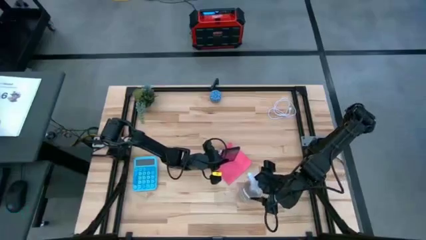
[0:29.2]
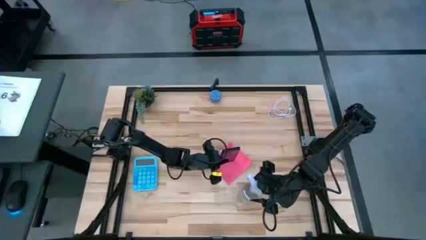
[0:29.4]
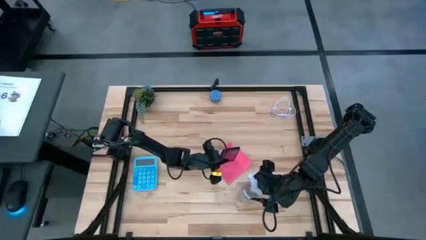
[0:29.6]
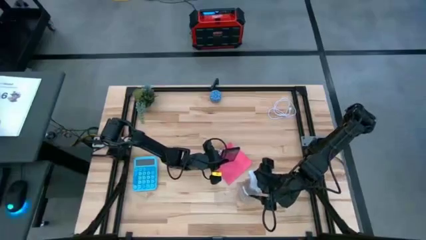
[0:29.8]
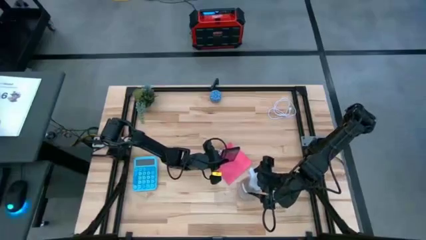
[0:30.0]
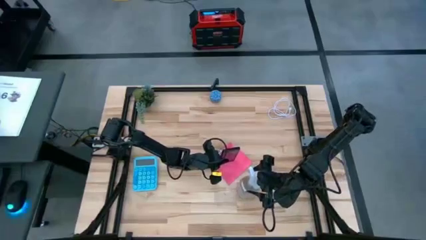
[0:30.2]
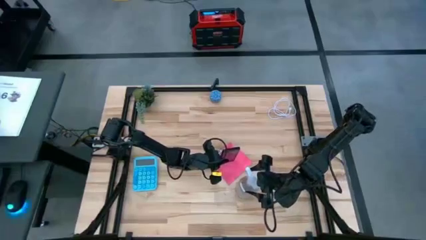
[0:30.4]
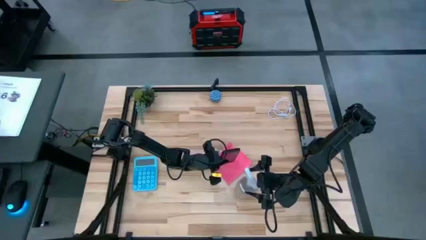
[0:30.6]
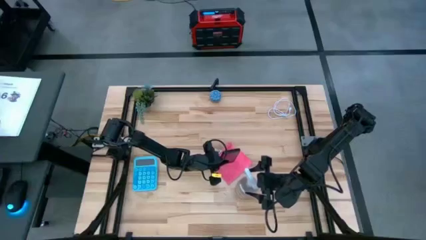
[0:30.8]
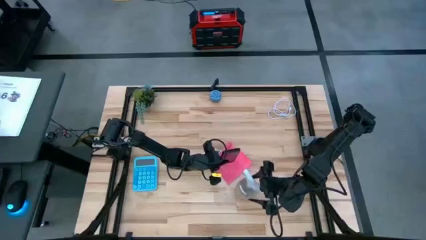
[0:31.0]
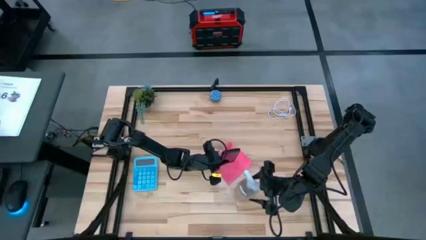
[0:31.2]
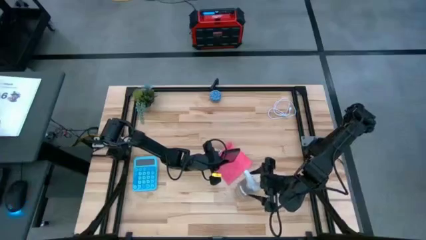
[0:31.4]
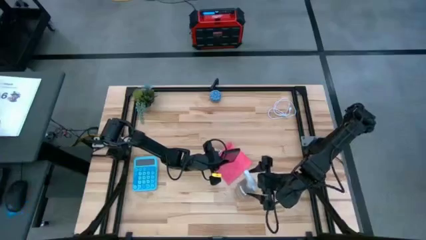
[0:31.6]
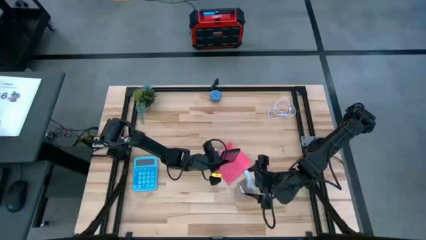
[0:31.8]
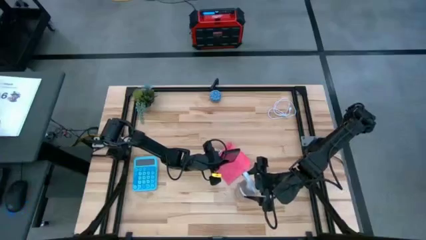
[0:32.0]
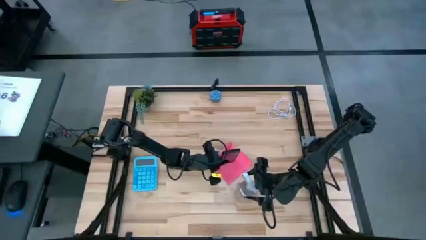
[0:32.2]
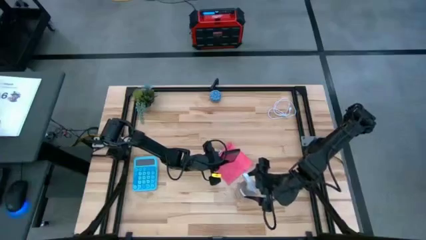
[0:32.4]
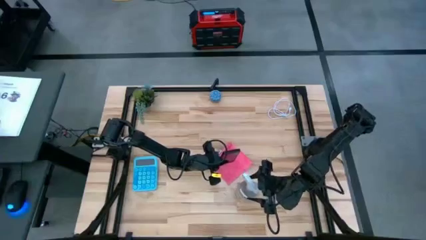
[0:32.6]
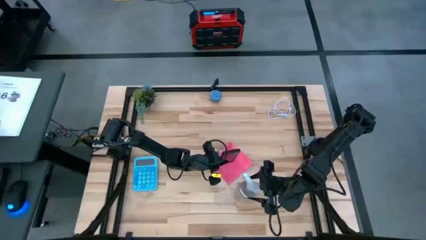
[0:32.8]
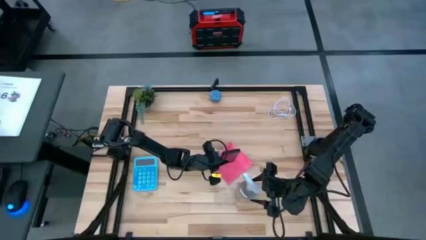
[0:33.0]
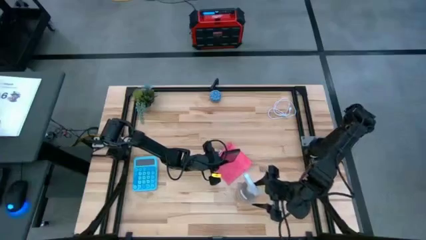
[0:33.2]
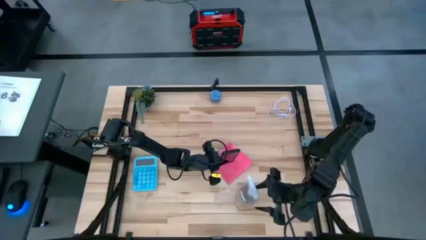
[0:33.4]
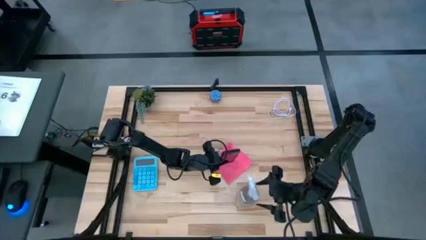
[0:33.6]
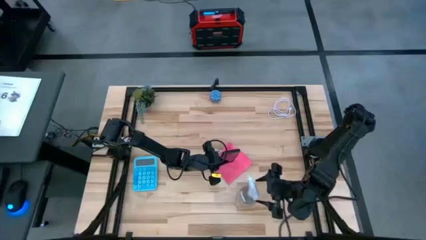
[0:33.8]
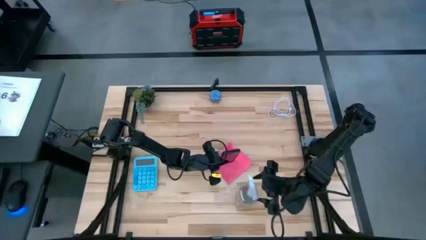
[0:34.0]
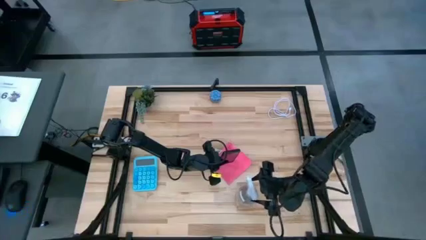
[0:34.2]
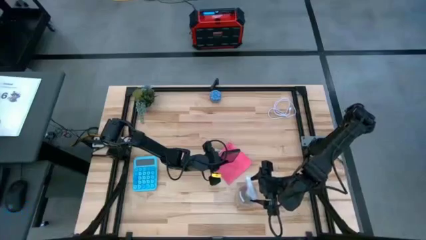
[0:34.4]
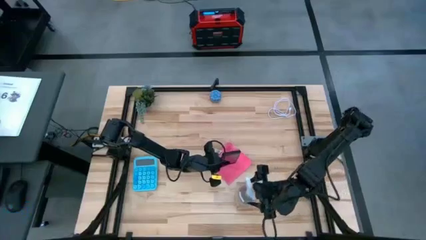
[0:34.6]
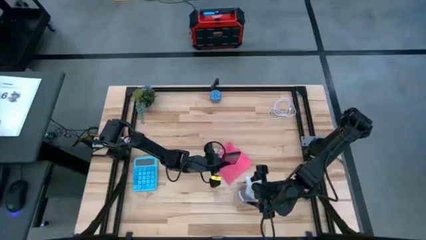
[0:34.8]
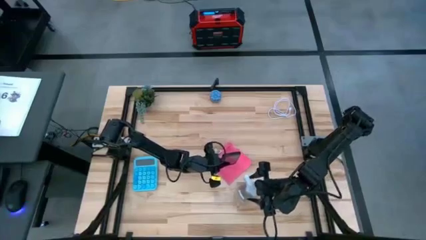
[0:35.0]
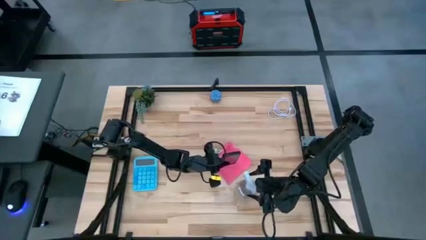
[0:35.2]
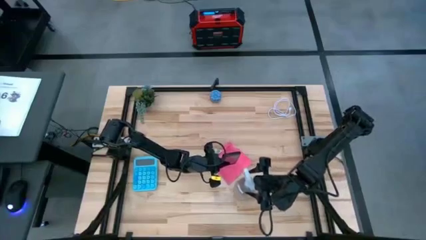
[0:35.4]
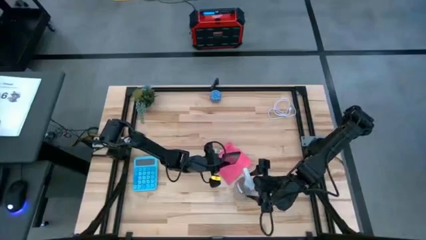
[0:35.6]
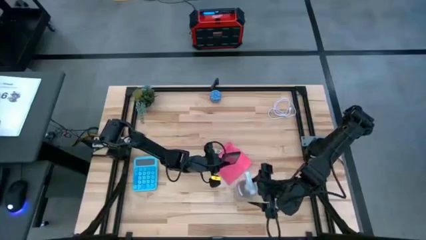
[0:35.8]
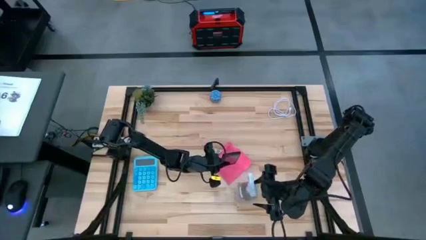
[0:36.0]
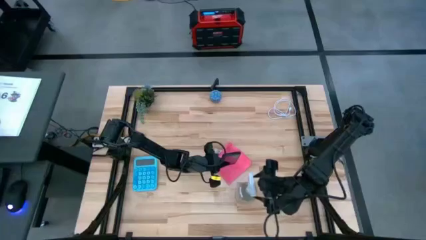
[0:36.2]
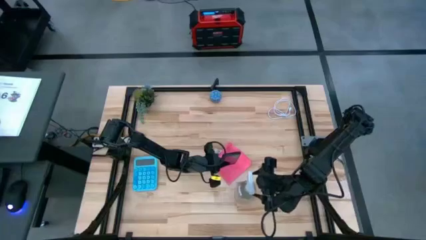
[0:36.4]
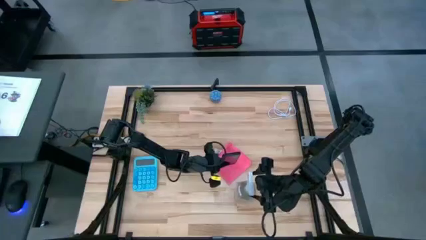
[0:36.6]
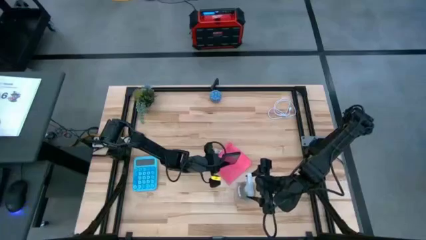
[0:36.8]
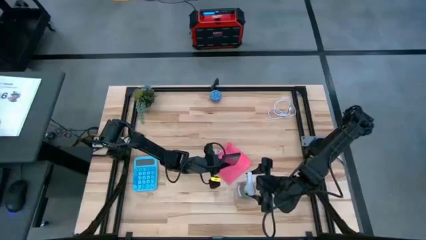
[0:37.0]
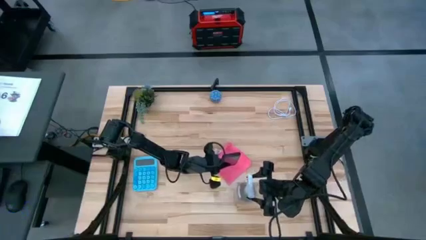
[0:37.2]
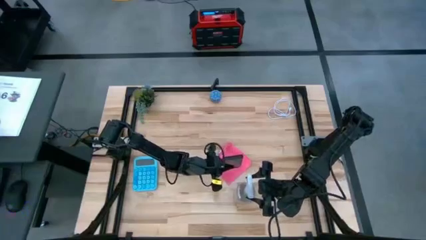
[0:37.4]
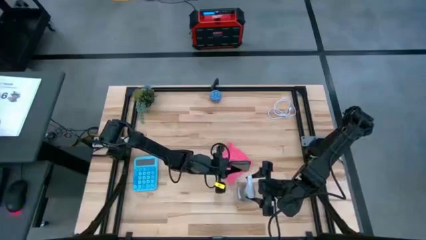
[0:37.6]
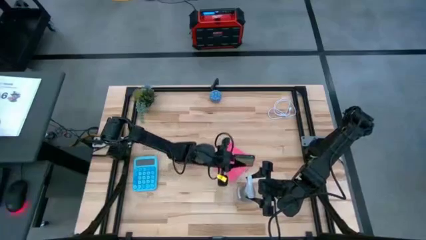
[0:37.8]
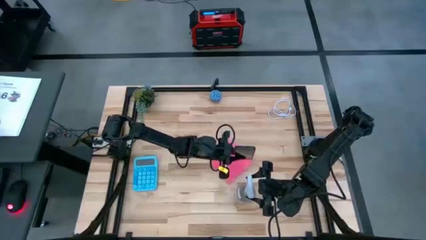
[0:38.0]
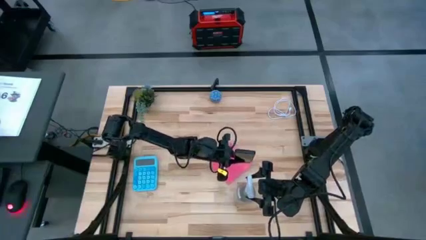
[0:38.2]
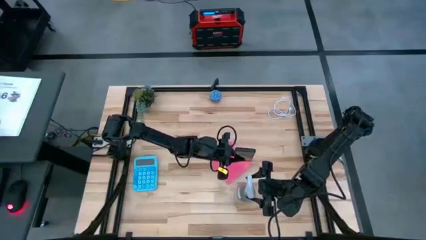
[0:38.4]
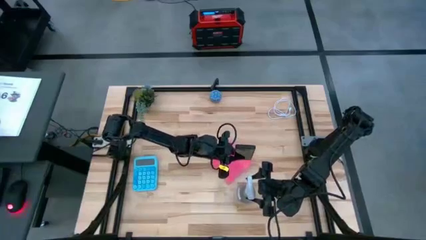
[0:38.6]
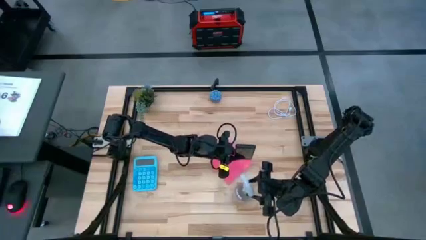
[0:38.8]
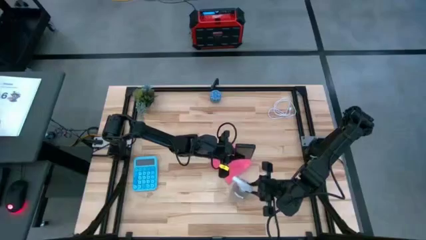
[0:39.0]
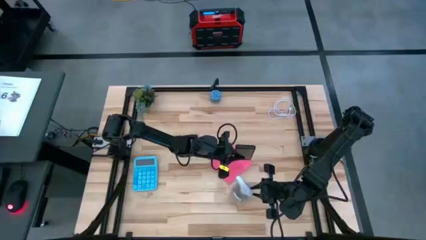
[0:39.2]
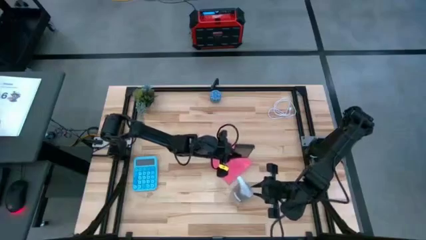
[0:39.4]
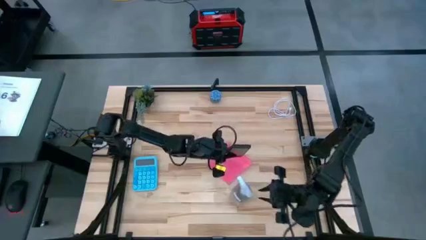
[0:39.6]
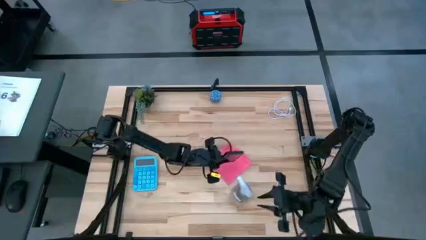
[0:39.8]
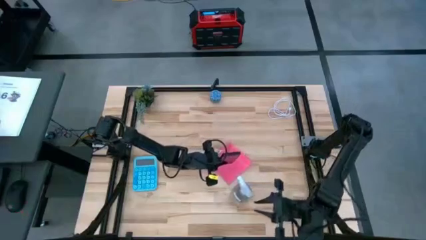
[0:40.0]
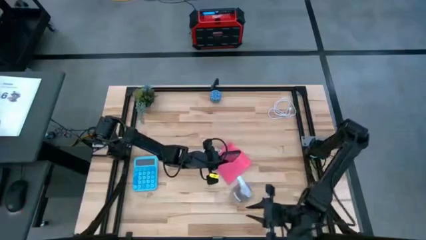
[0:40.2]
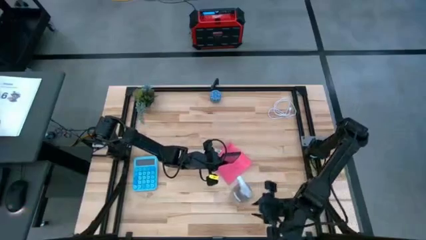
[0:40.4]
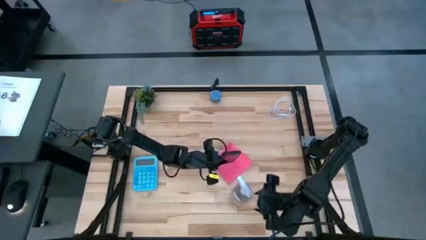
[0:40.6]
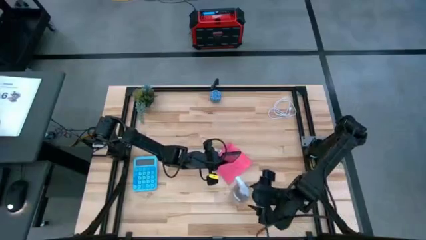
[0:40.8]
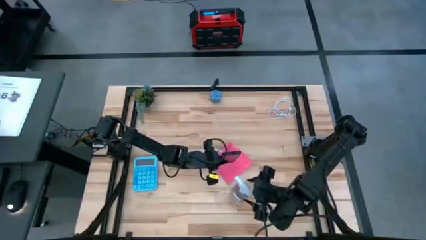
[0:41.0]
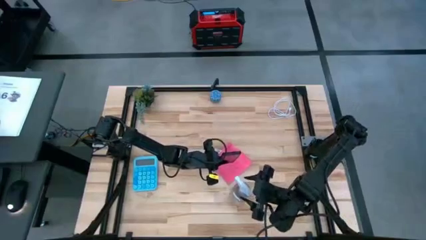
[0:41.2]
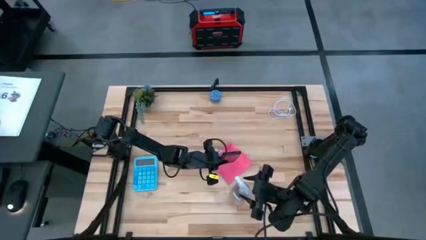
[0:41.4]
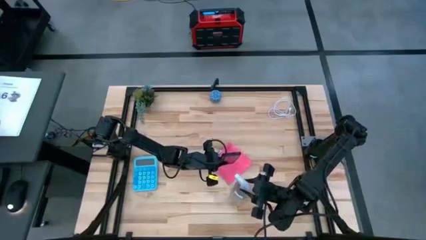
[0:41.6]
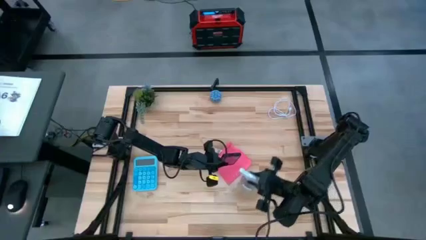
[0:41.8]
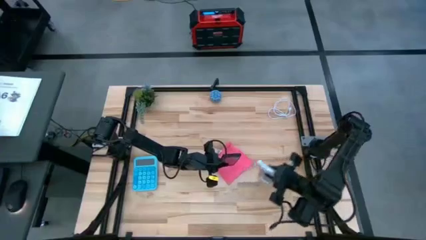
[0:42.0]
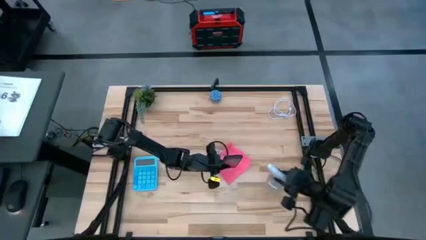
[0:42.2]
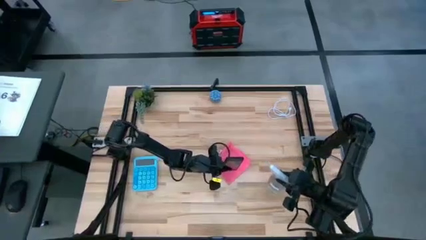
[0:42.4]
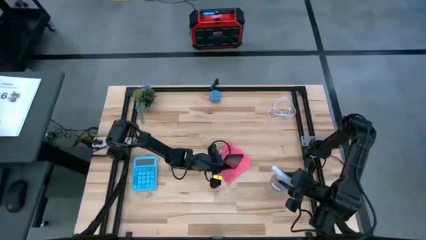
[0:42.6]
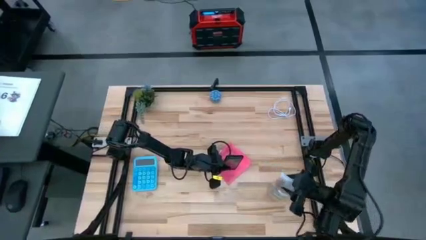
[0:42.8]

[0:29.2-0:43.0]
Task: Apply microfiber cloth
Spray the black cellphone with the transparent spray bottle
